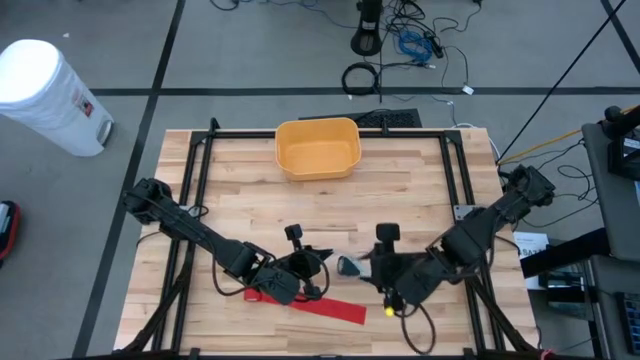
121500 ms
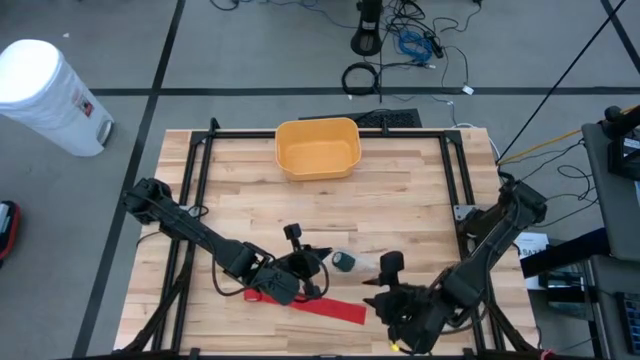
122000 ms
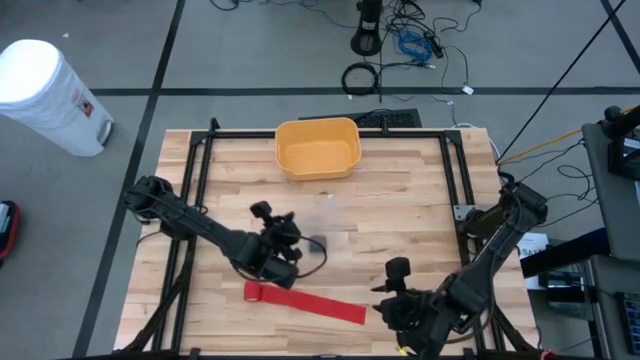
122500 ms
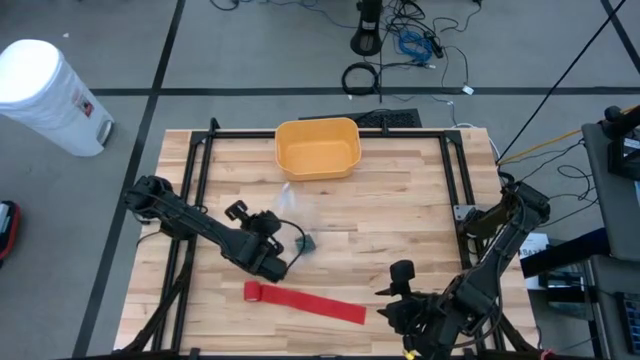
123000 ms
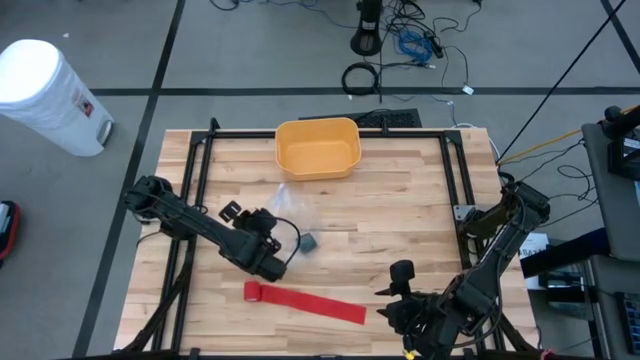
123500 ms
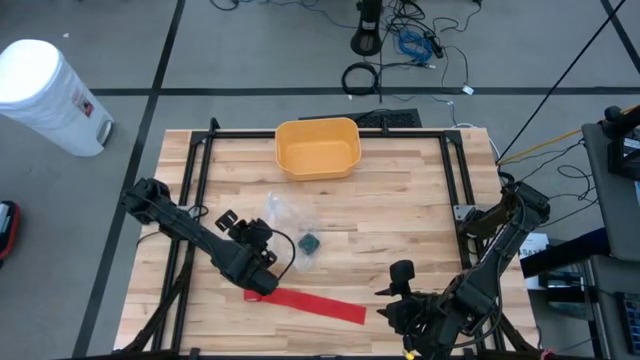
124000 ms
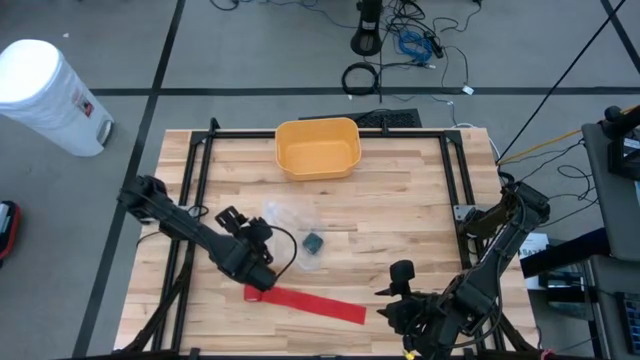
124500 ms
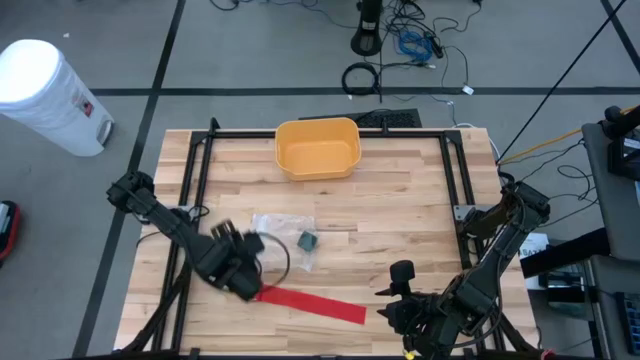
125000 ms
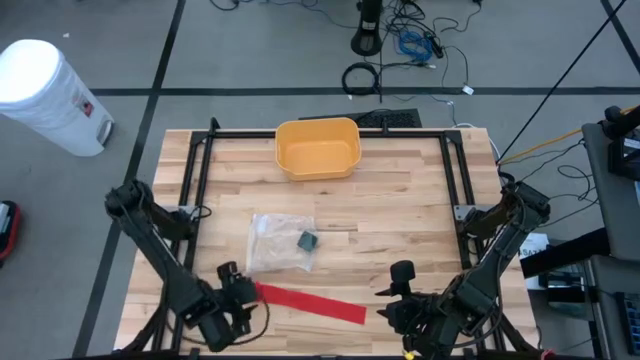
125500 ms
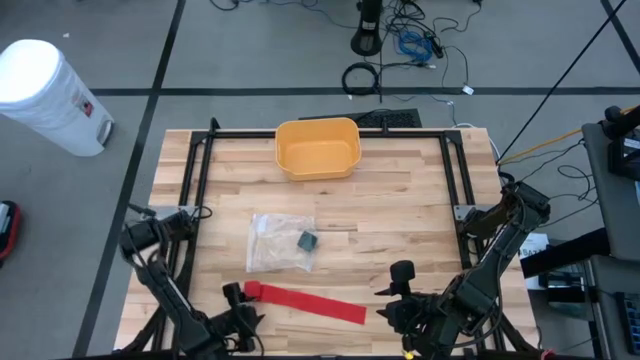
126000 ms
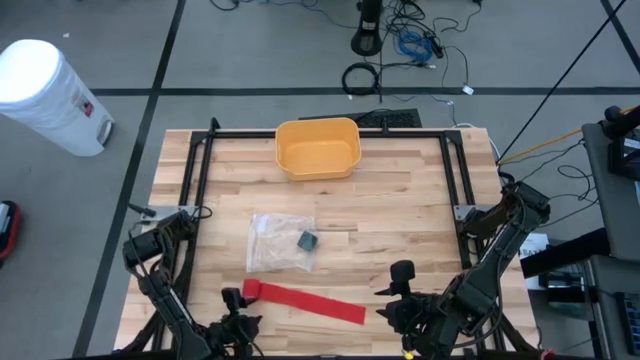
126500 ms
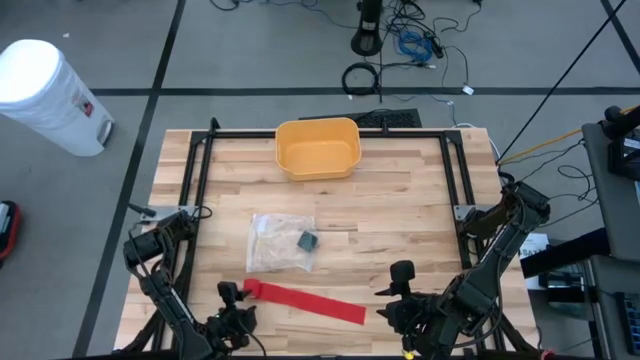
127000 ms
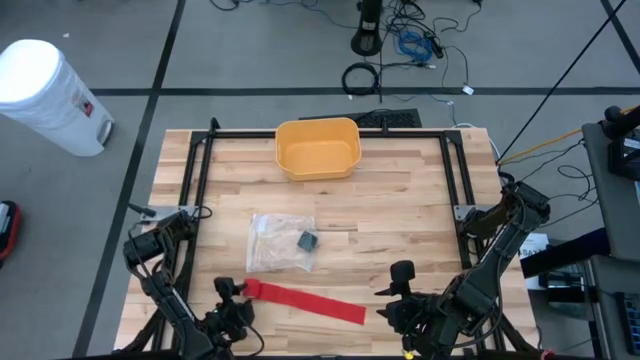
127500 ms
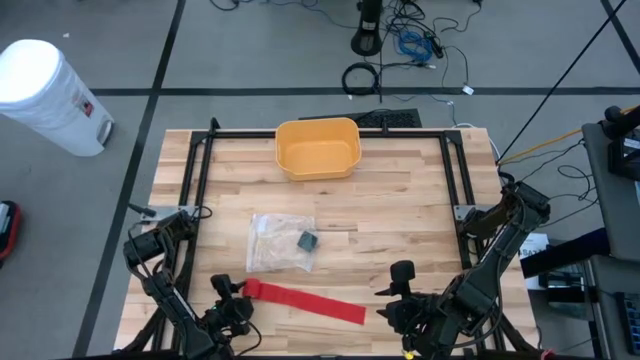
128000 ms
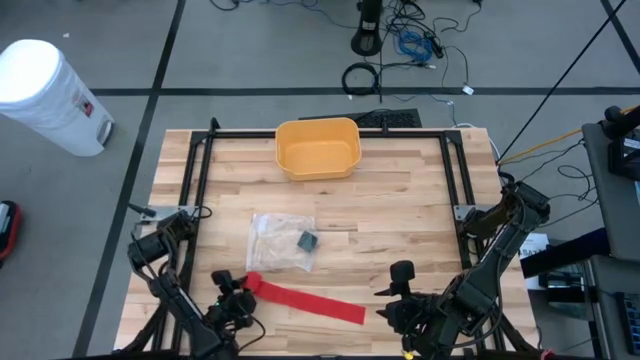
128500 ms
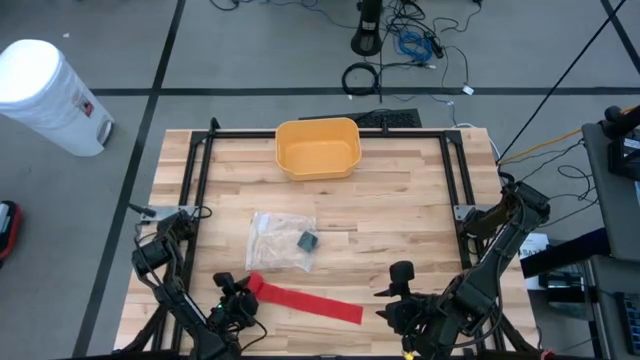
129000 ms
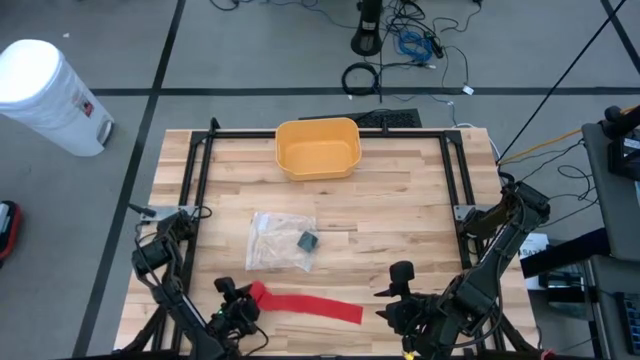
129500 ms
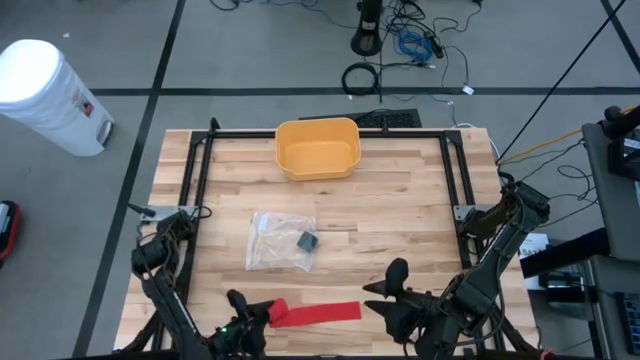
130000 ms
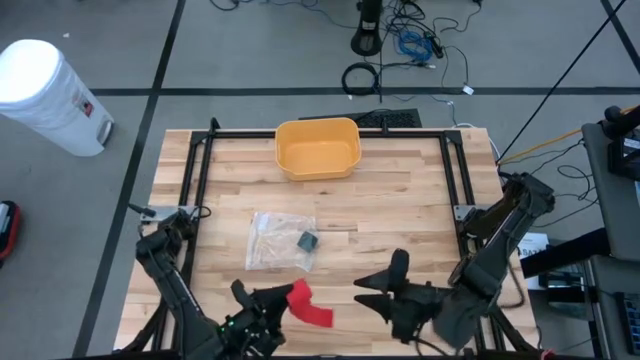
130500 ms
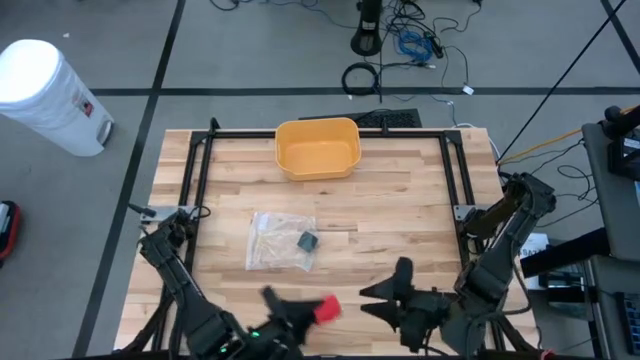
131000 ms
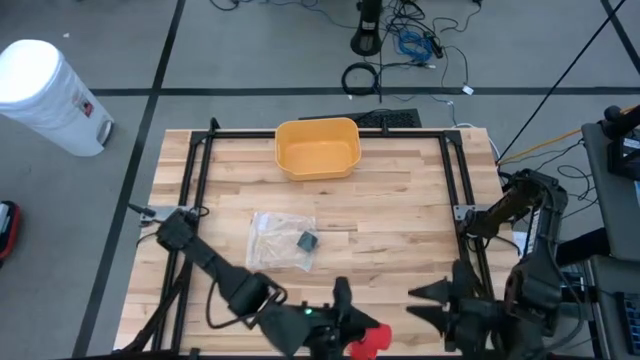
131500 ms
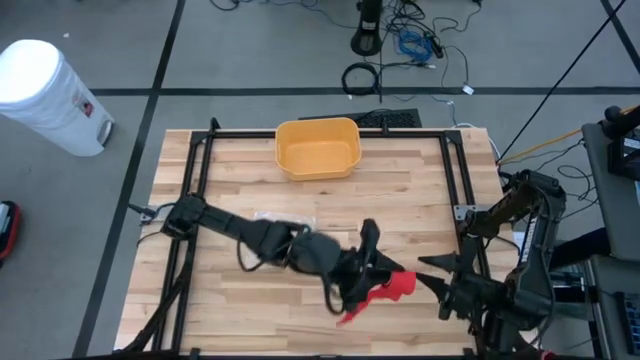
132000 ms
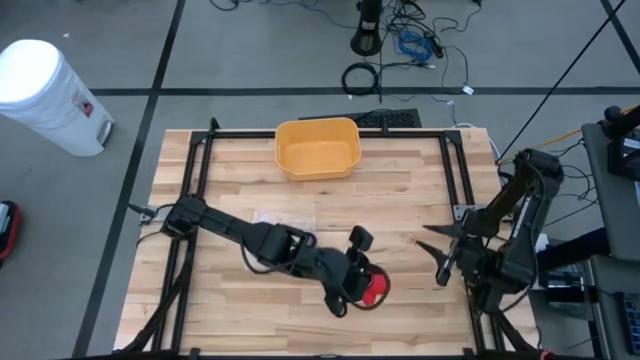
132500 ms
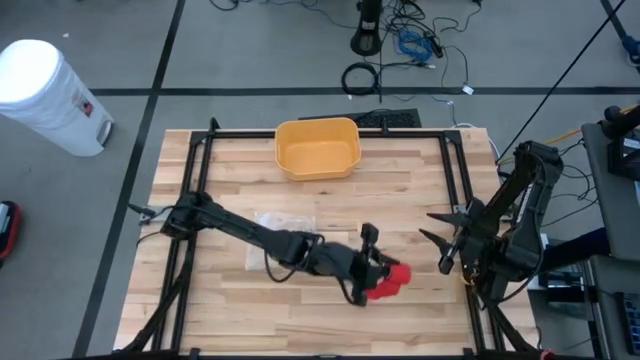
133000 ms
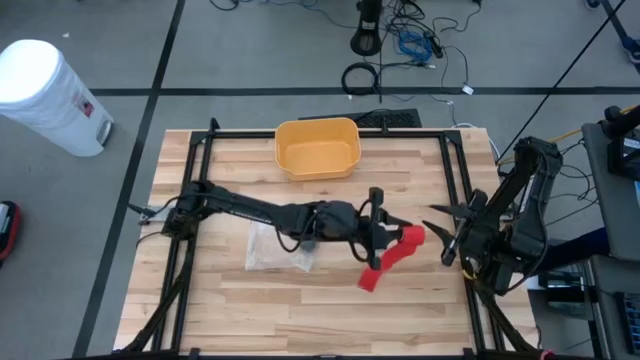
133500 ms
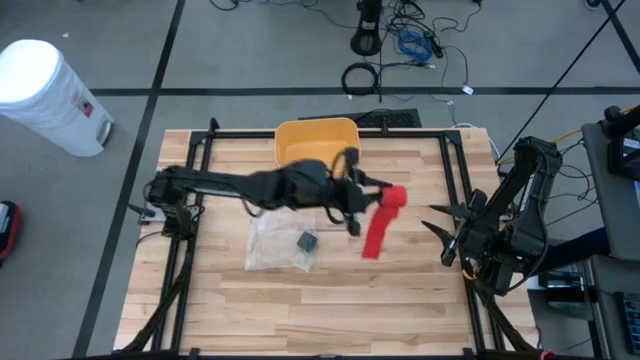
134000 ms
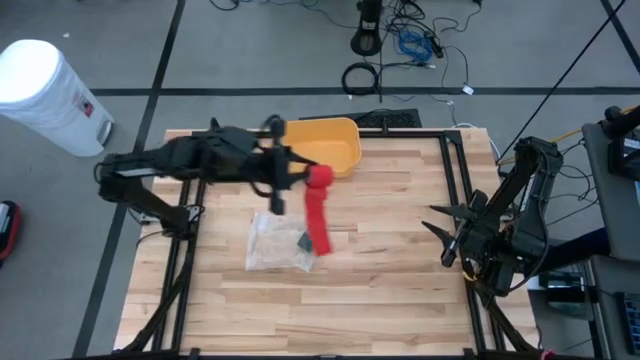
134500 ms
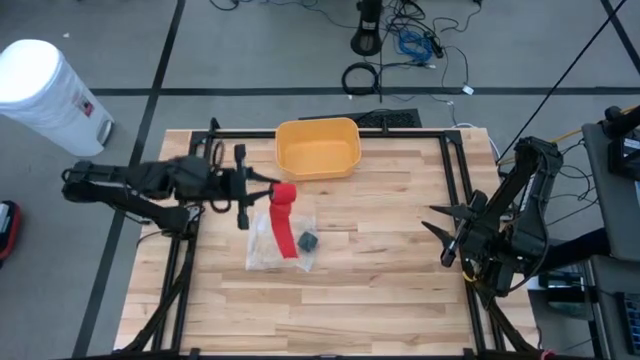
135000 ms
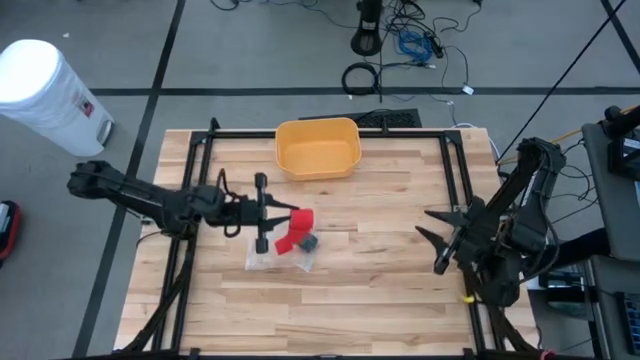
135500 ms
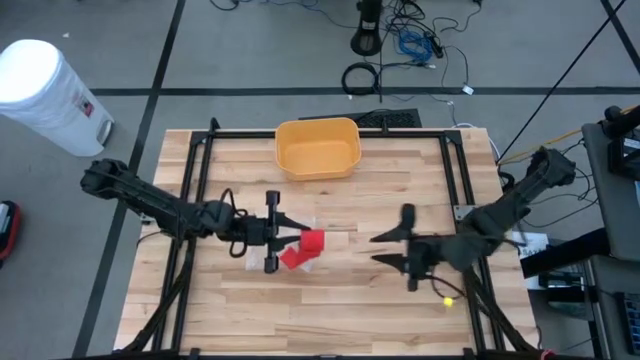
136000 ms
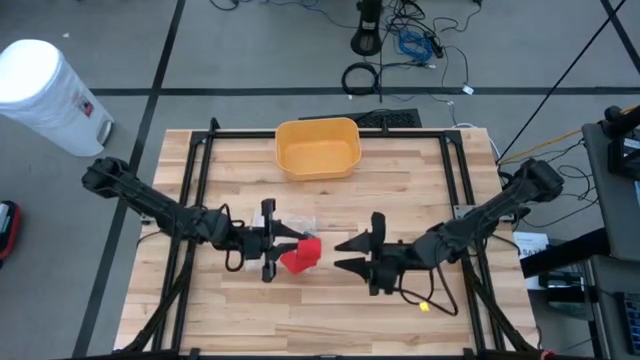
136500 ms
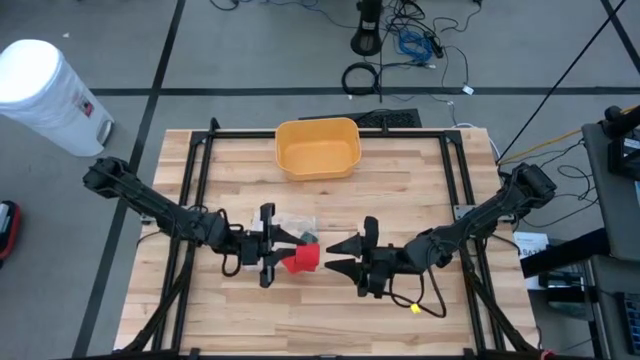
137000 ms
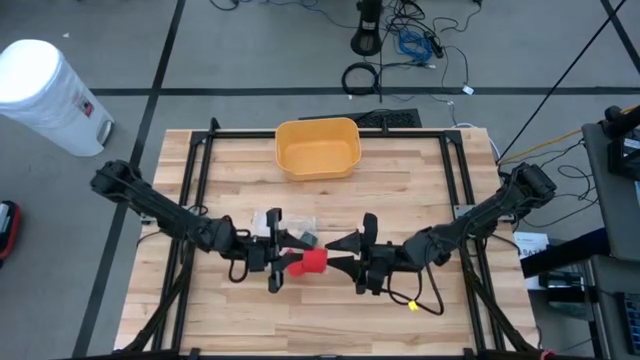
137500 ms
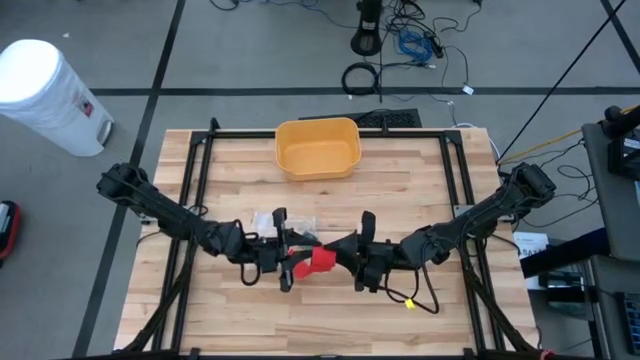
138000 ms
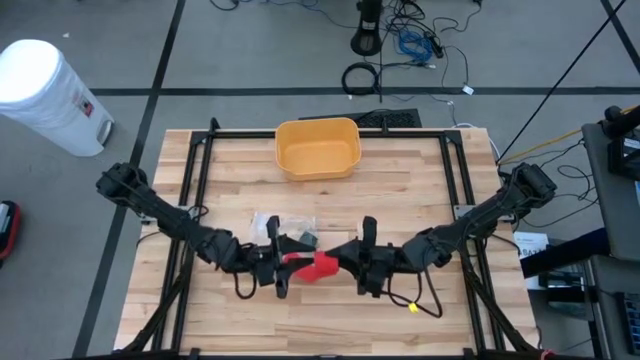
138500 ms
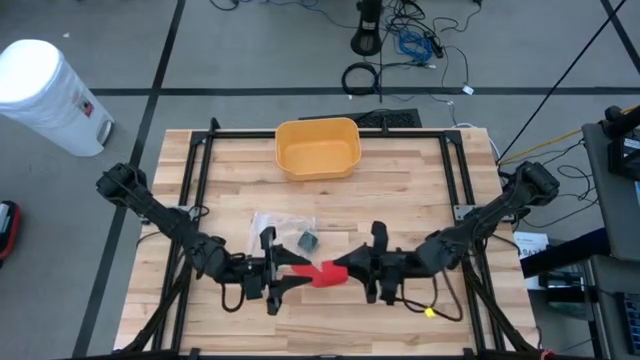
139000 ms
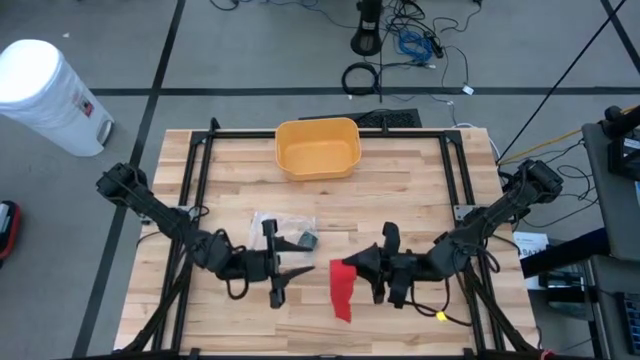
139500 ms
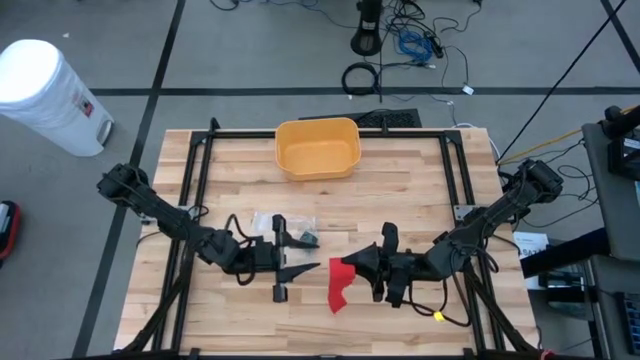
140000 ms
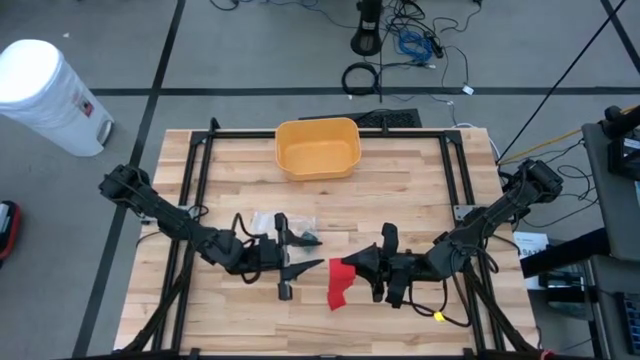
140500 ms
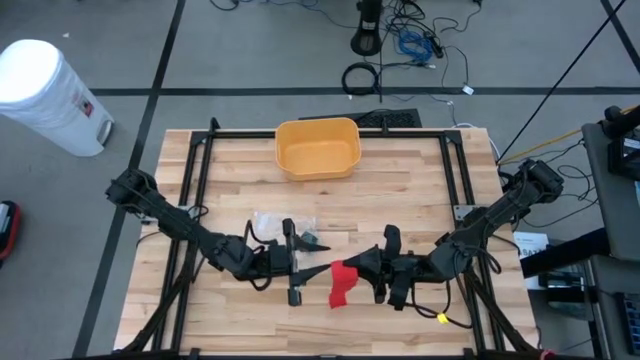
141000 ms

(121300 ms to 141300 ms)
Task: Roll bandage
Roll the red bandage
